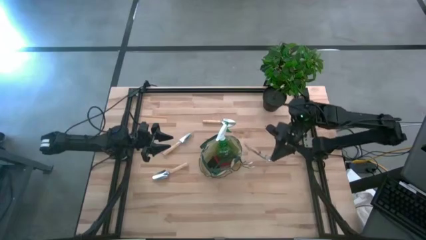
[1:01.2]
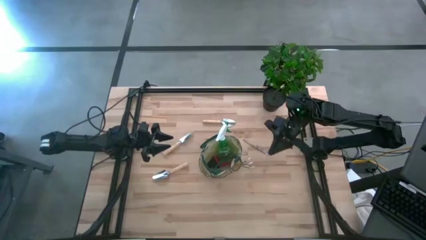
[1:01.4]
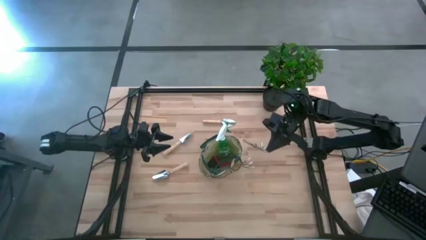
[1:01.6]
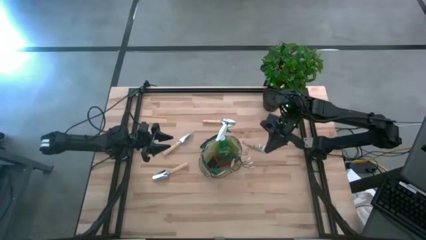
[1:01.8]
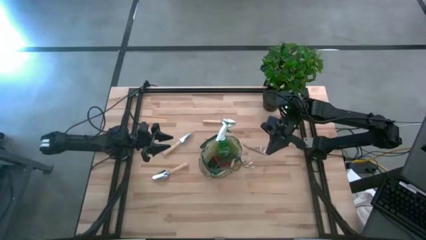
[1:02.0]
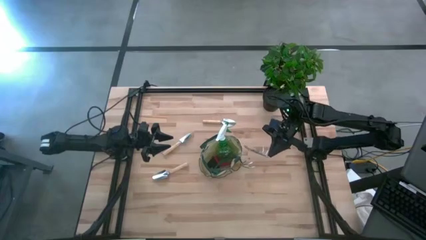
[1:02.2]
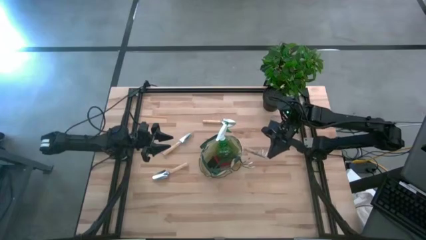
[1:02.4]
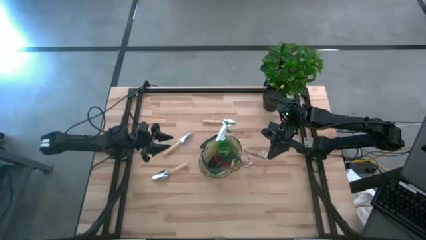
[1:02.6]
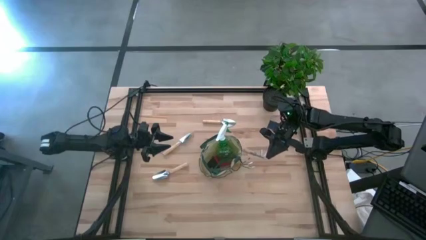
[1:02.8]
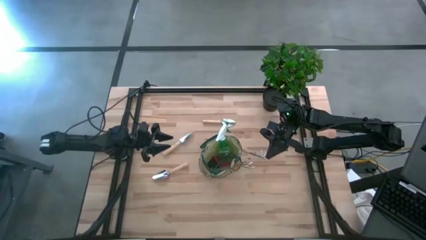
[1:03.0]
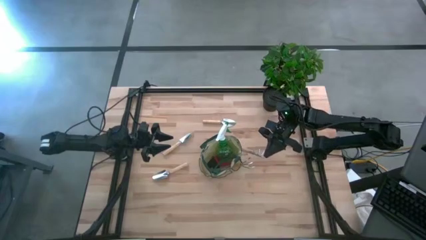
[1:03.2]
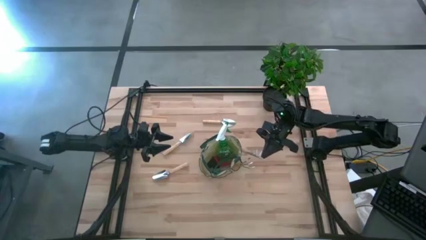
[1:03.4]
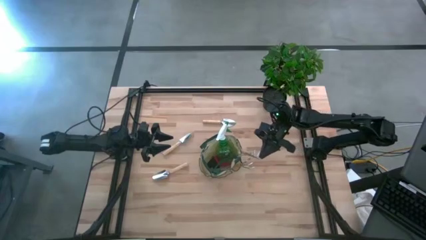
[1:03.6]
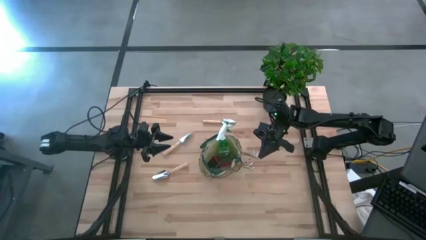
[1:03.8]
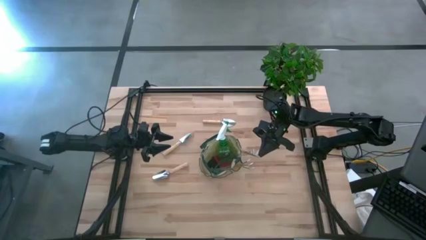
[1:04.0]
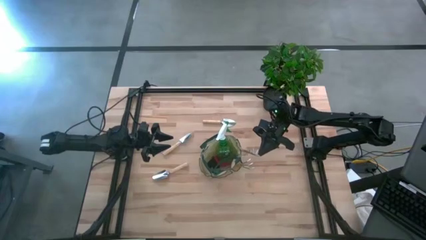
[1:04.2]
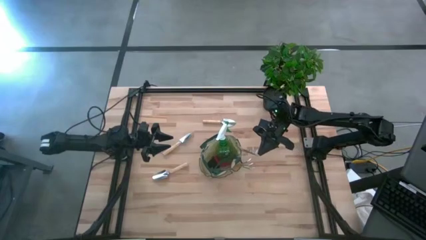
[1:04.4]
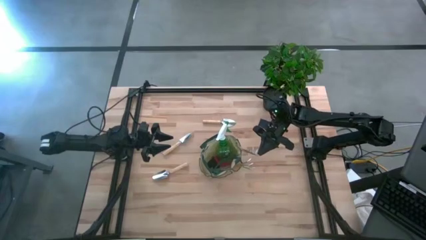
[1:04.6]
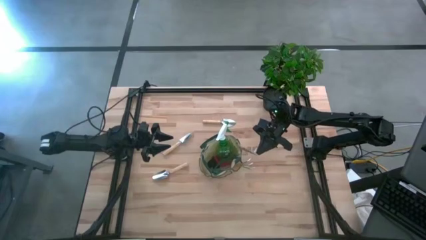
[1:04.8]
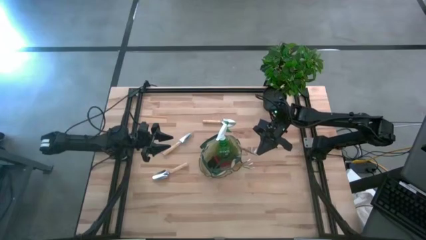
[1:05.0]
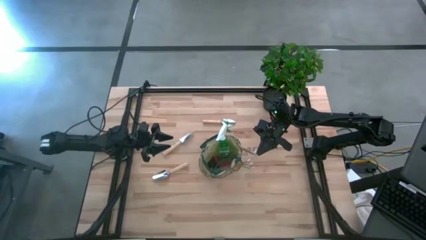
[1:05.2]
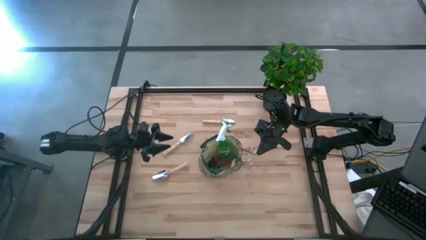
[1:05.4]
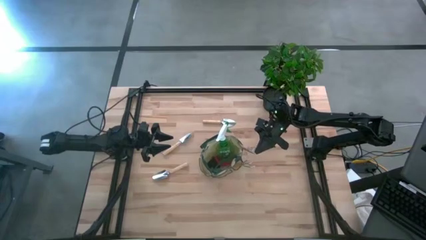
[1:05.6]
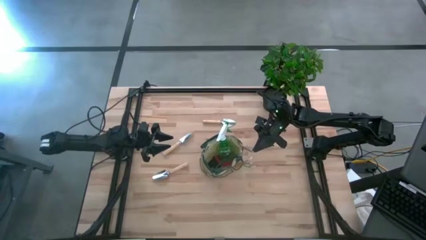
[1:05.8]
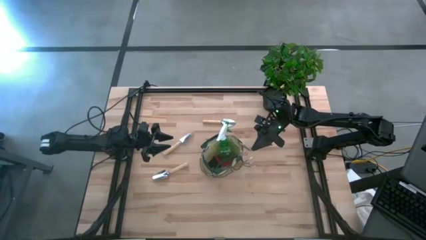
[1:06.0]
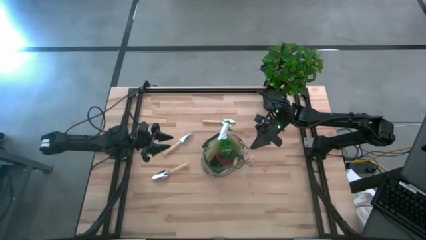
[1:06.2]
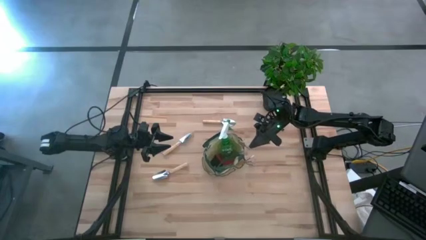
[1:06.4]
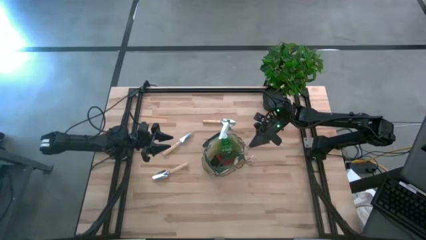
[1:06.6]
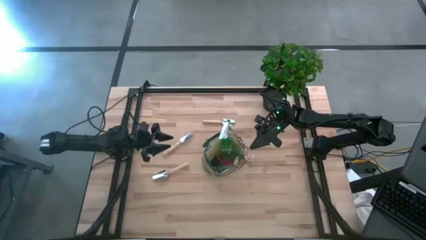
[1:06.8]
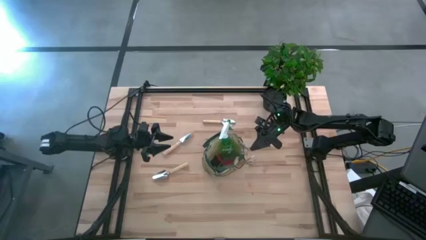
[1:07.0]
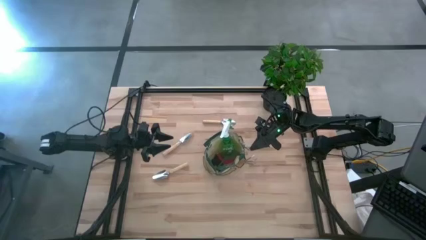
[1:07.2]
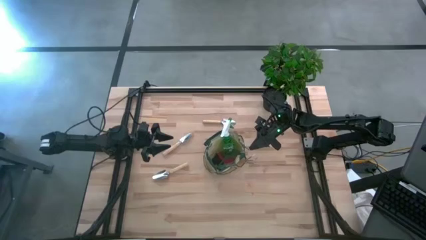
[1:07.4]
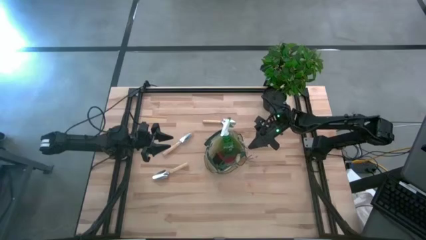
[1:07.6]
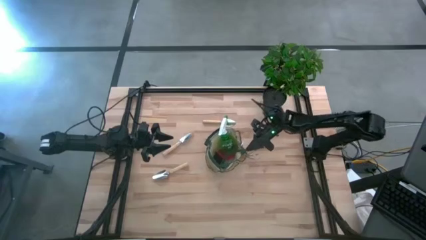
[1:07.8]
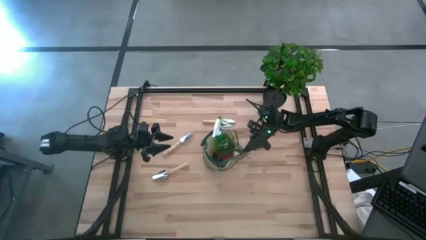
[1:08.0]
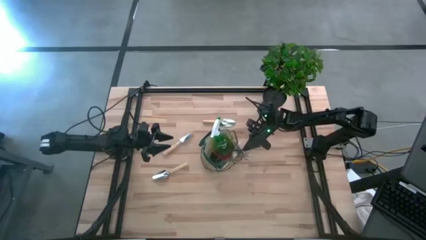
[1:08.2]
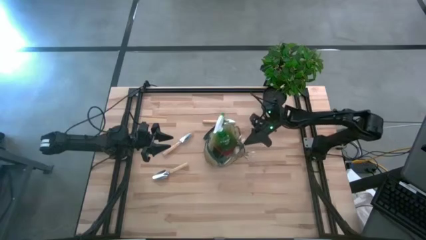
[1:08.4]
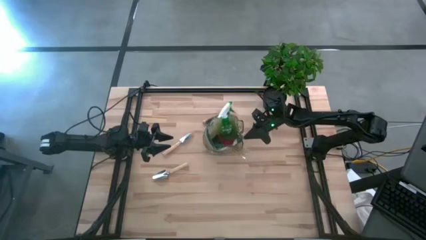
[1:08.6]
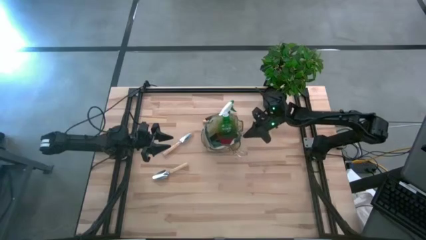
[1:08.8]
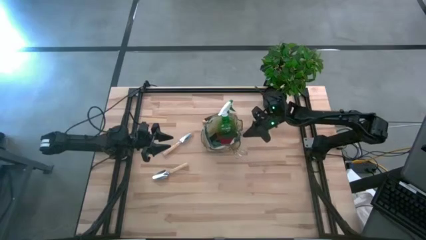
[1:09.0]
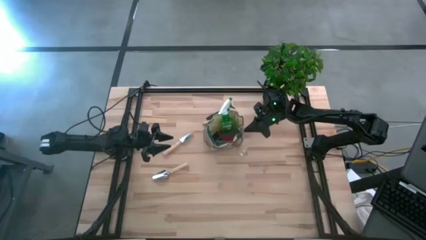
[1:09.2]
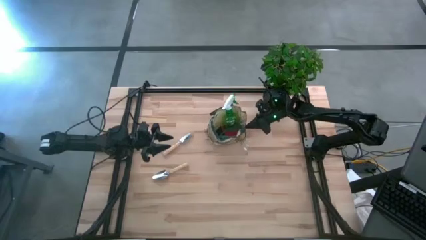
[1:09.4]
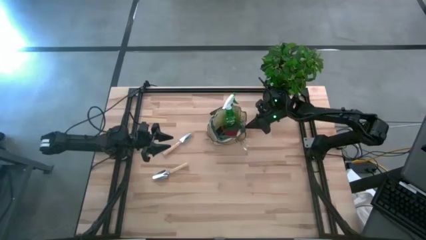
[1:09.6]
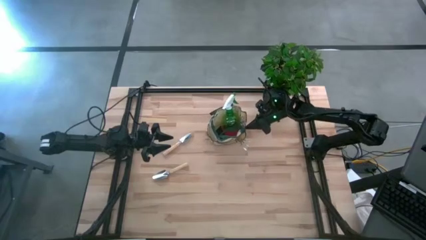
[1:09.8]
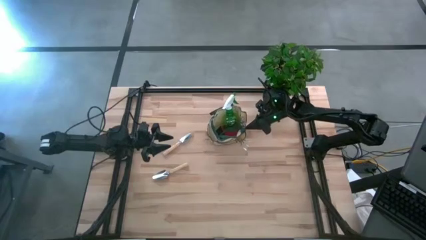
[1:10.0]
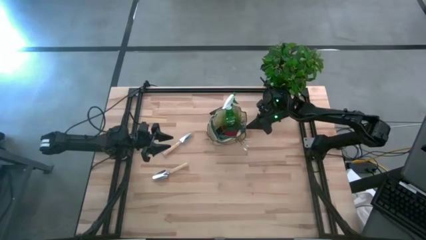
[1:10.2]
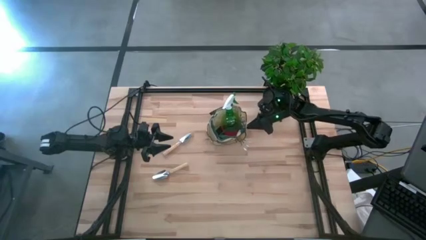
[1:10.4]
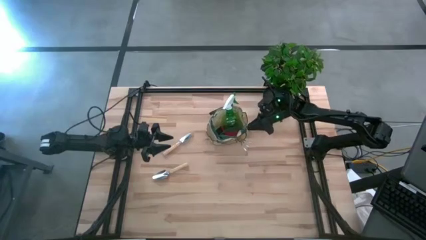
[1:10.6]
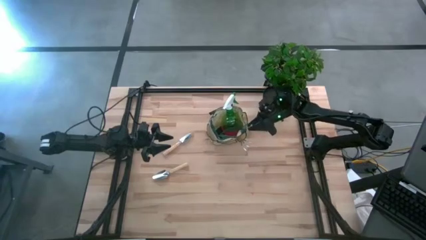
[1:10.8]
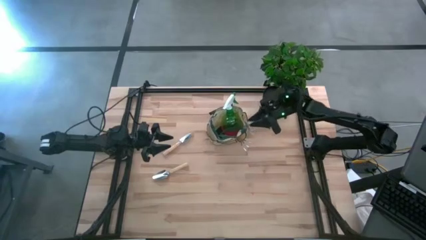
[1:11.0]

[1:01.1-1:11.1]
Task: Pick & Place Garden tools in Gardening bag
Put the brown hand rake into the green gardening bag

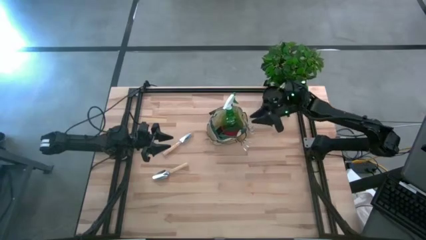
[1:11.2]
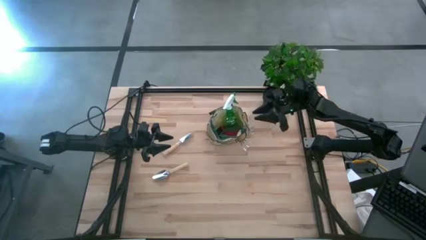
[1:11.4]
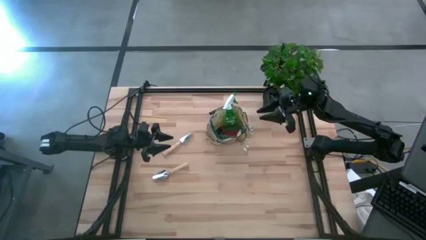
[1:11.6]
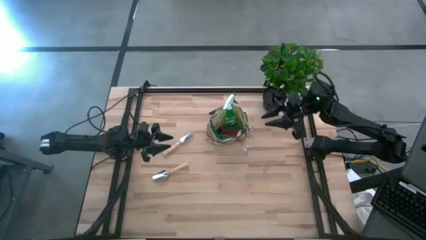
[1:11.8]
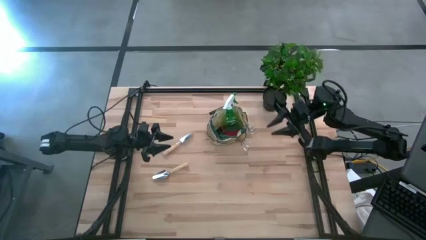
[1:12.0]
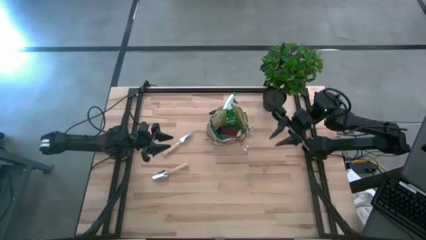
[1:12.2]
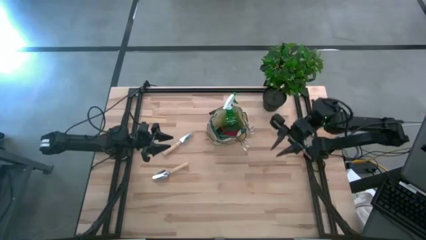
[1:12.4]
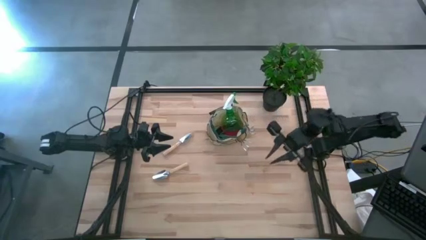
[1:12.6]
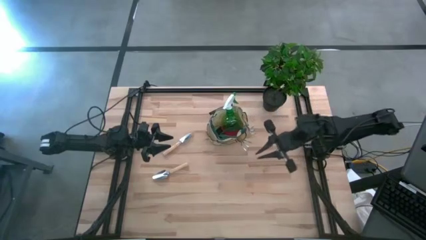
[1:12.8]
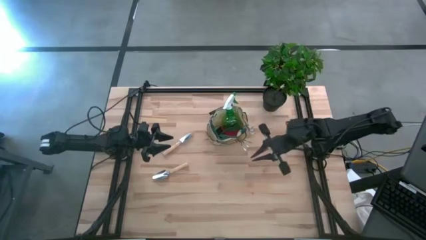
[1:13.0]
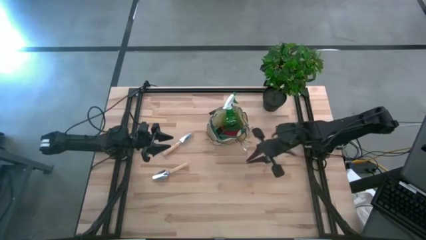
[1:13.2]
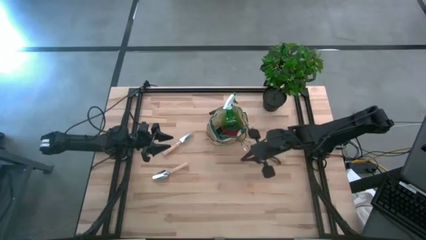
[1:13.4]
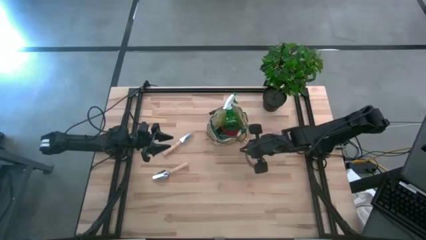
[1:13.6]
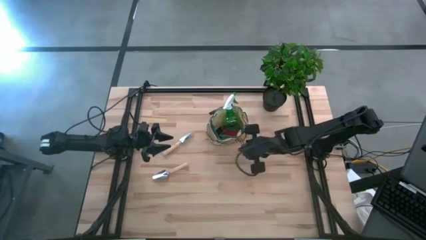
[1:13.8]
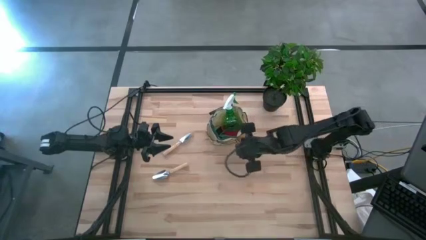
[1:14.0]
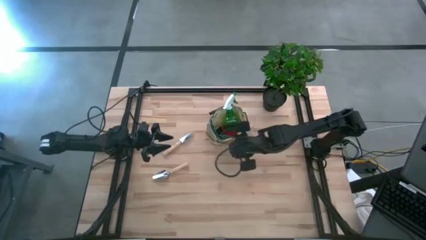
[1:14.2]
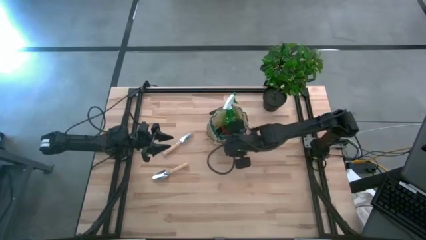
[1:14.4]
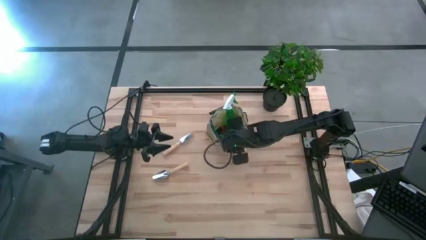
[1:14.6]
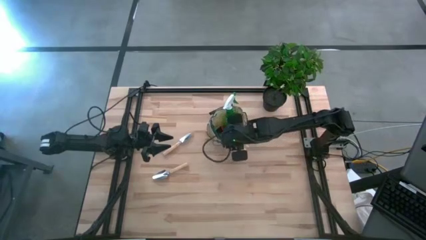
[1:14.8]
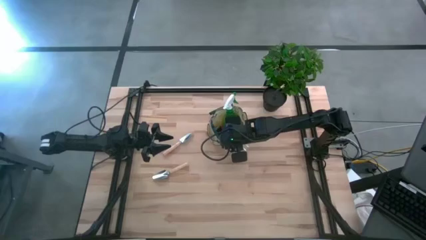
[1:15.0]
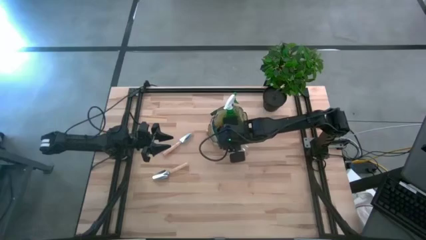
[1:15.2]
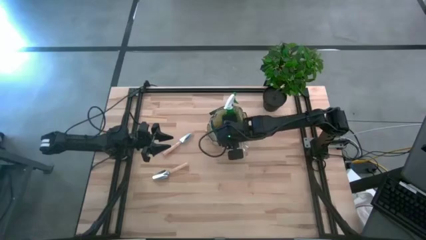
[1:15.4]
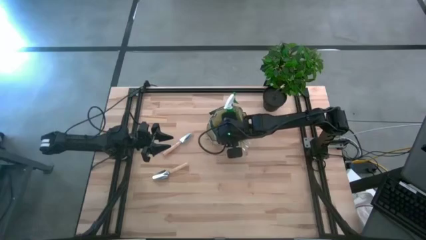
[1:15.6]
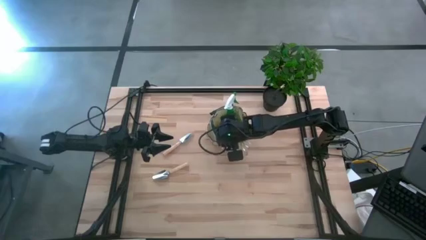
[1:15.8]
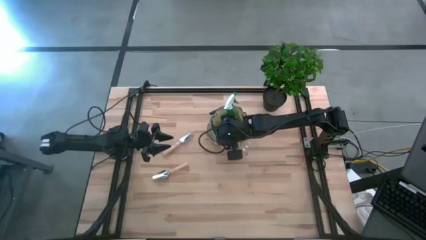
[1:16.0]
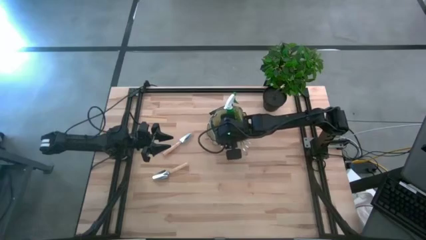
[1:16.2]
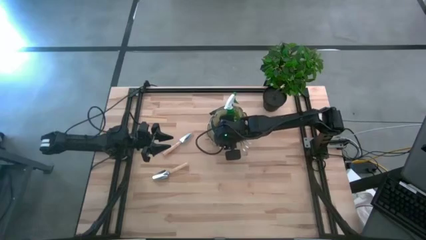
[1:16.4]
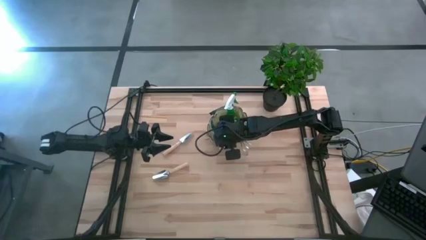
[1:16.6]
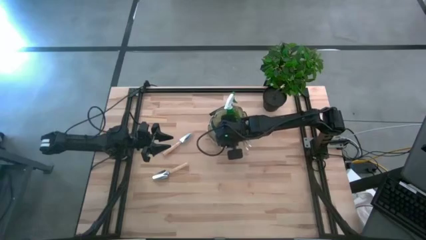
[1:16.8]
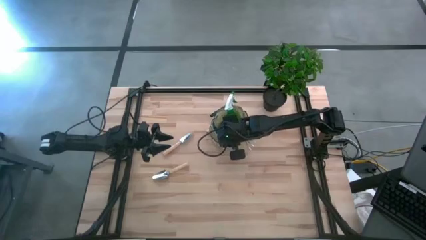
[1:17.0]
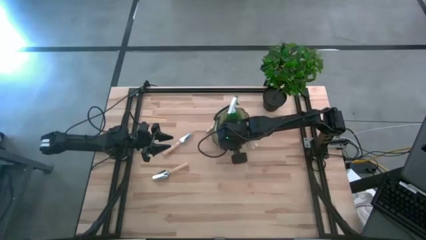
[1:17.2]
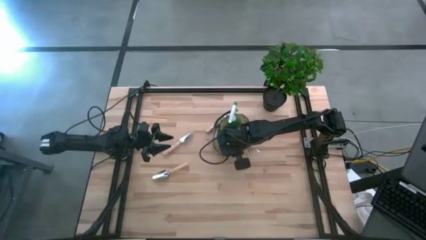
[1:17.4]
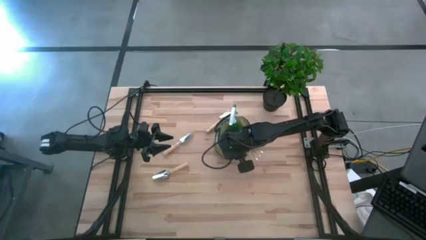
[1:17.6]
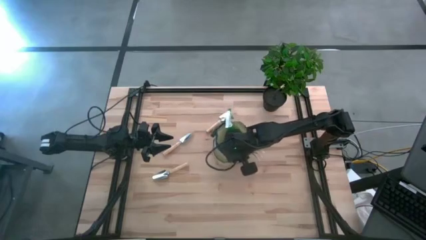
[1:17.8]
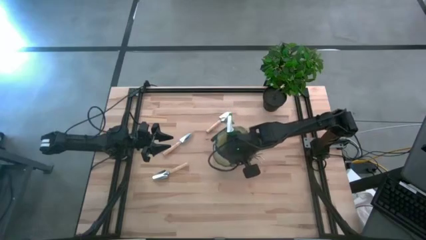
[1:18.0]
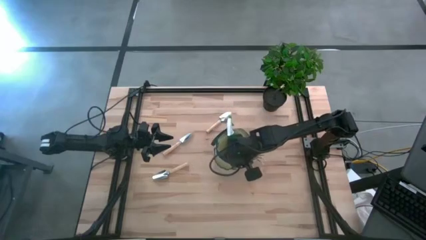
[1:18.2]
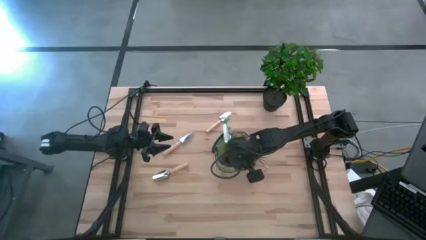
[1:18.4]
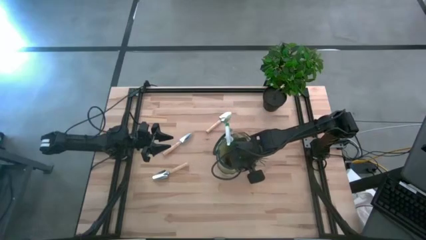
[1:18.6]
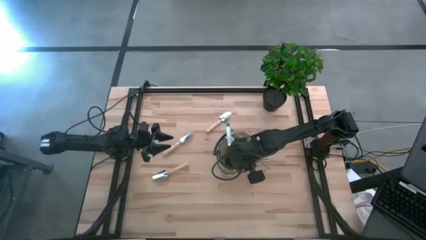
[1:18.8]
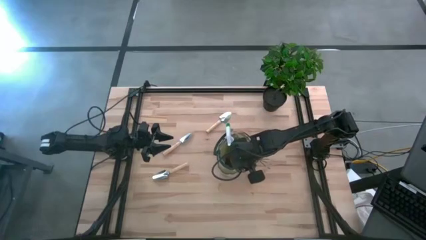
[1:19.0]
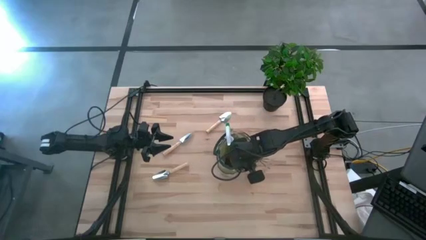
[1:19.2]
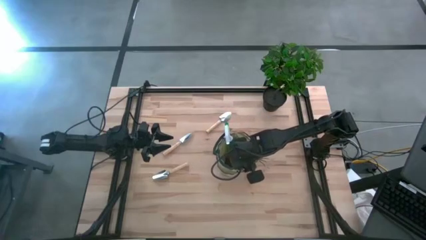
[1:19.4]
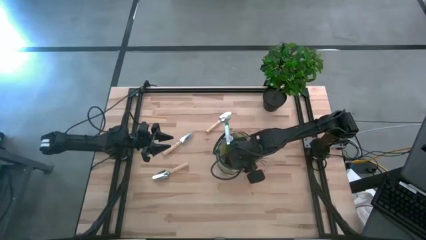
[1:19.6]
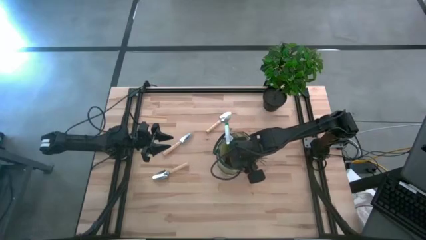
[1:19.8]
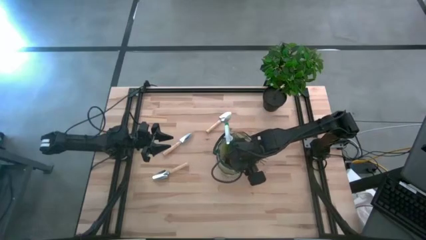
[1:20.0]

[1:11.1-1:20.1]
Adjust the green gardening bag
